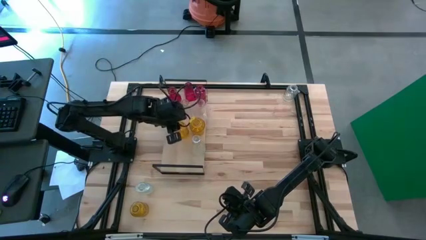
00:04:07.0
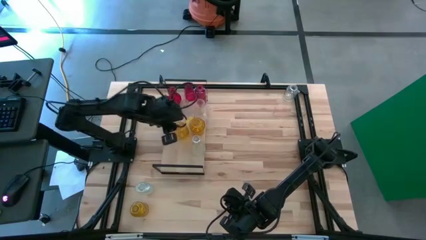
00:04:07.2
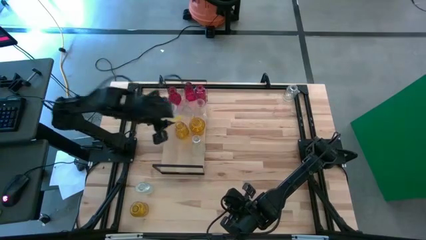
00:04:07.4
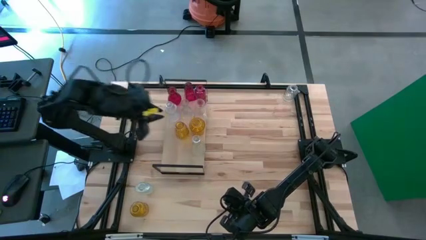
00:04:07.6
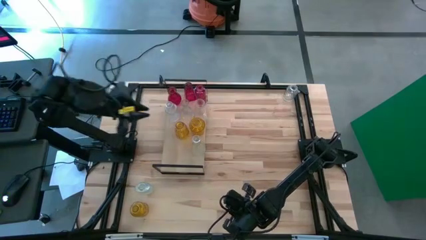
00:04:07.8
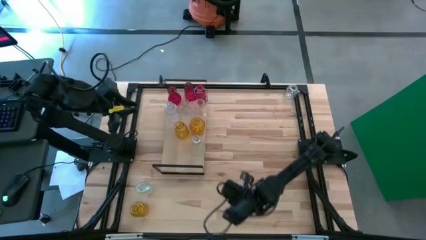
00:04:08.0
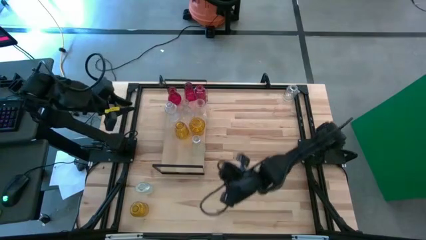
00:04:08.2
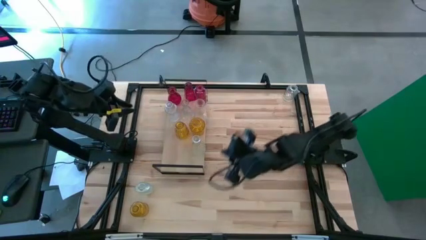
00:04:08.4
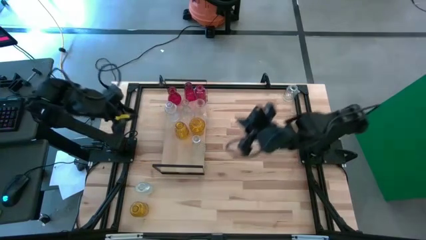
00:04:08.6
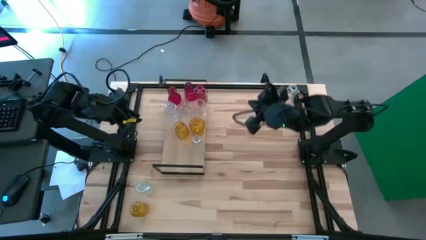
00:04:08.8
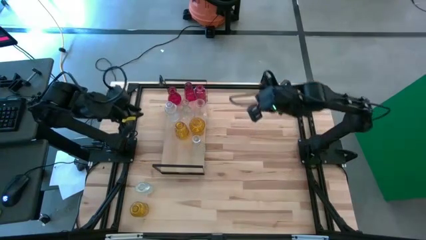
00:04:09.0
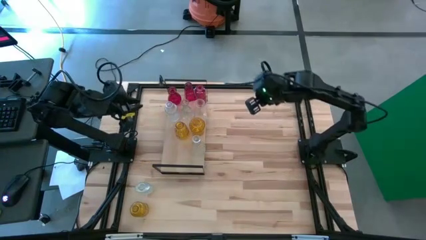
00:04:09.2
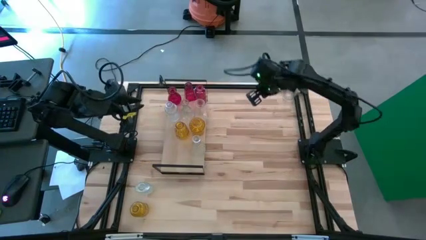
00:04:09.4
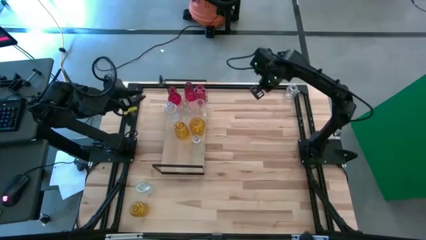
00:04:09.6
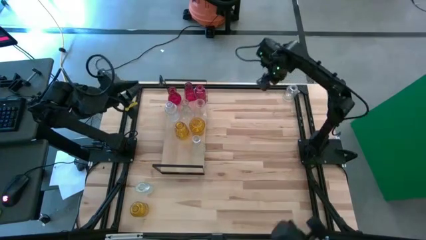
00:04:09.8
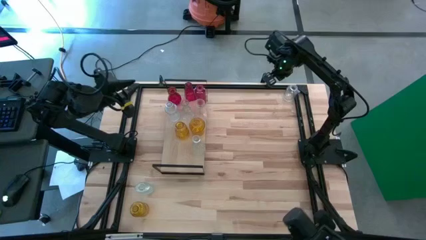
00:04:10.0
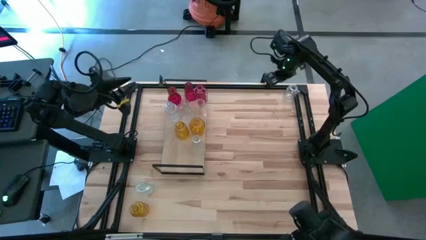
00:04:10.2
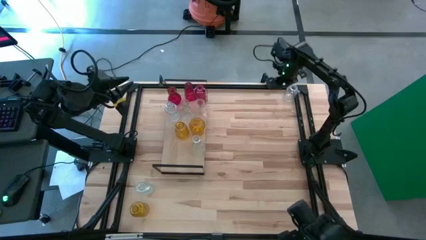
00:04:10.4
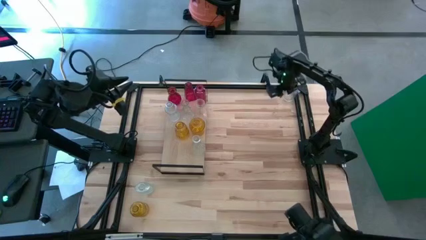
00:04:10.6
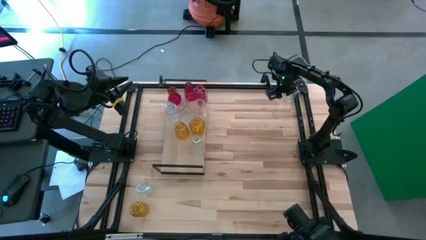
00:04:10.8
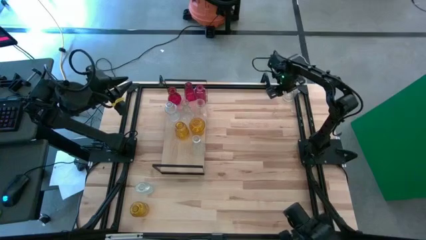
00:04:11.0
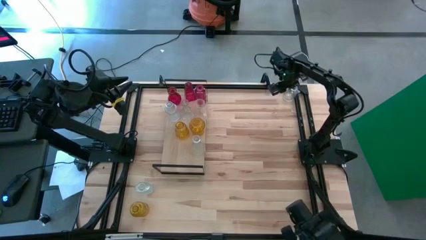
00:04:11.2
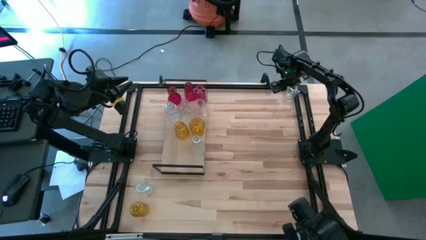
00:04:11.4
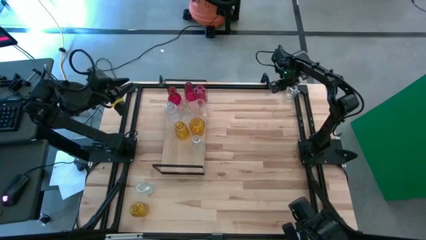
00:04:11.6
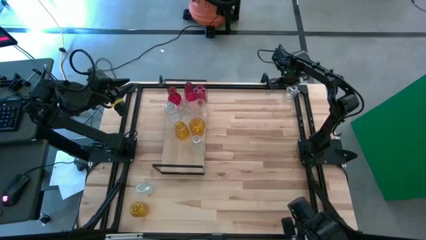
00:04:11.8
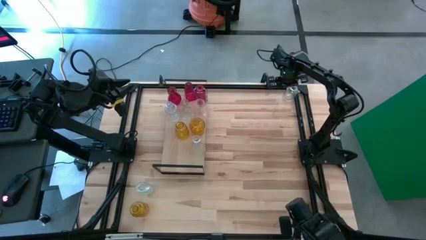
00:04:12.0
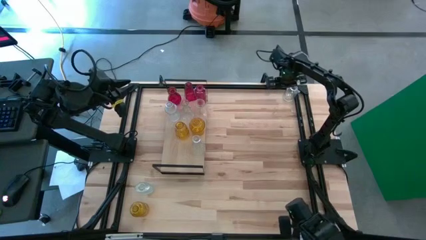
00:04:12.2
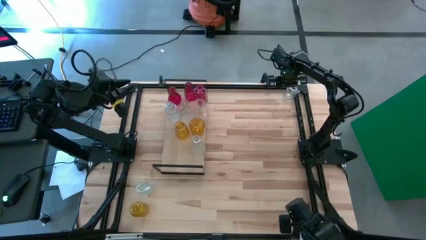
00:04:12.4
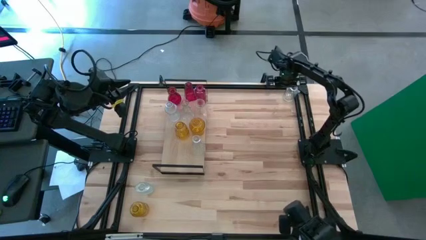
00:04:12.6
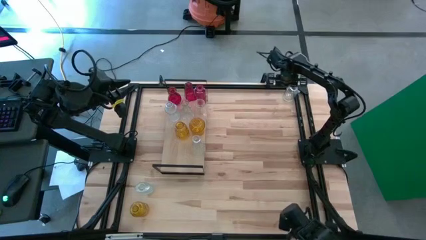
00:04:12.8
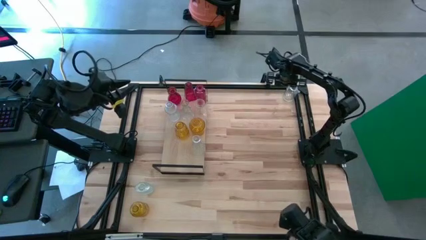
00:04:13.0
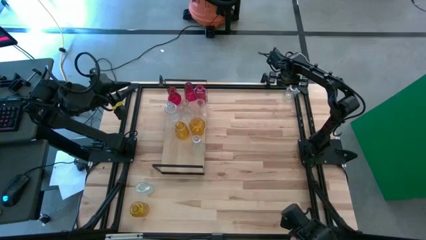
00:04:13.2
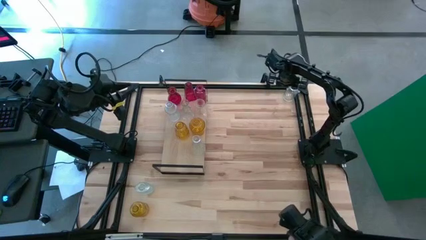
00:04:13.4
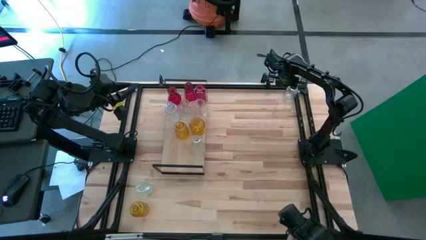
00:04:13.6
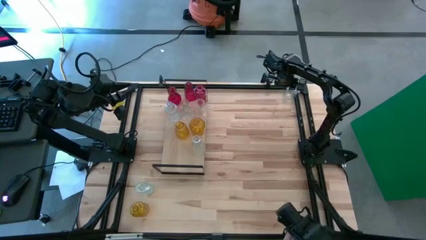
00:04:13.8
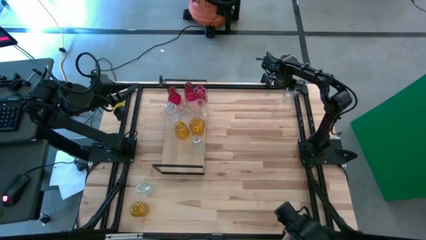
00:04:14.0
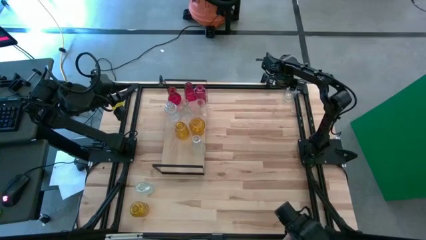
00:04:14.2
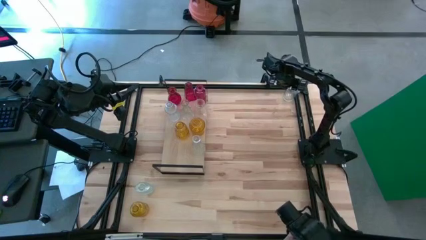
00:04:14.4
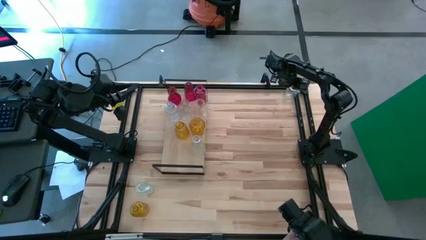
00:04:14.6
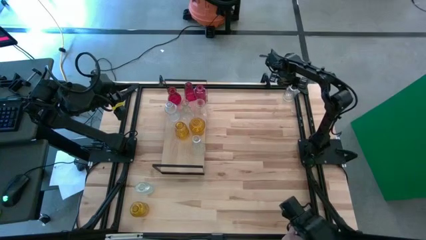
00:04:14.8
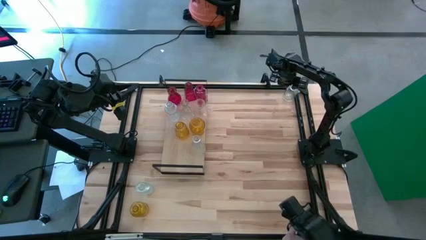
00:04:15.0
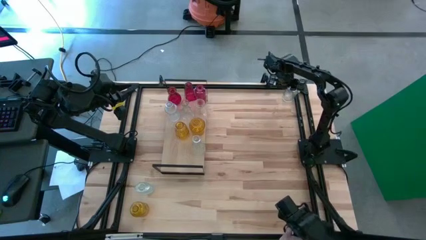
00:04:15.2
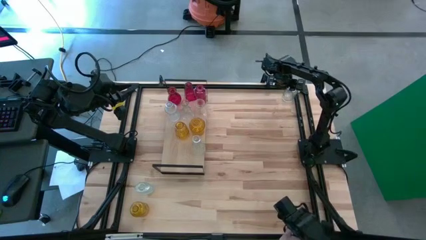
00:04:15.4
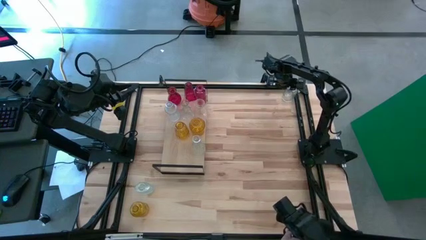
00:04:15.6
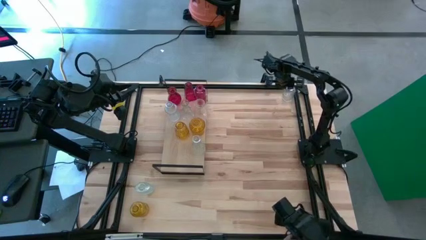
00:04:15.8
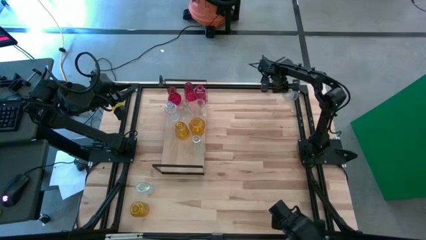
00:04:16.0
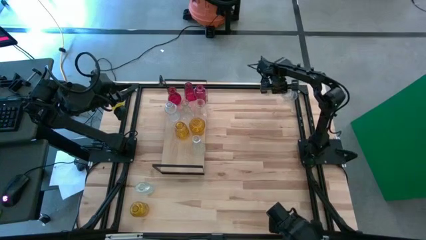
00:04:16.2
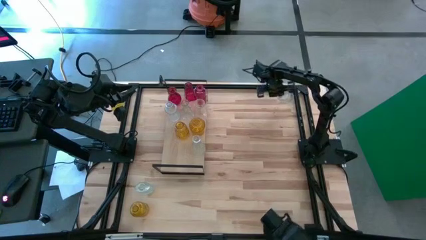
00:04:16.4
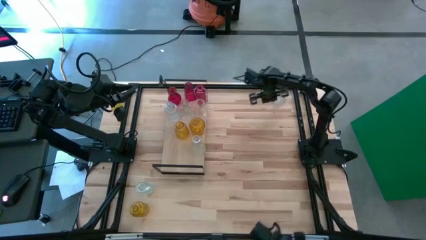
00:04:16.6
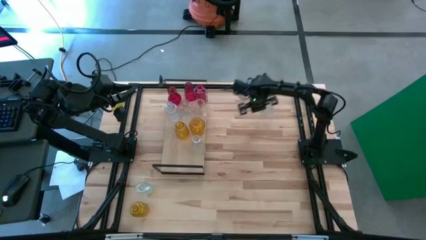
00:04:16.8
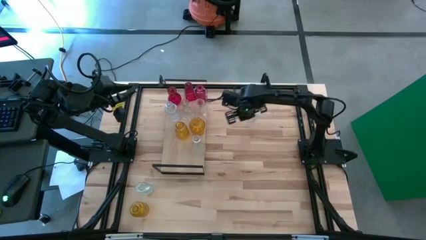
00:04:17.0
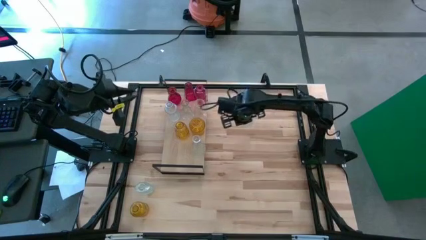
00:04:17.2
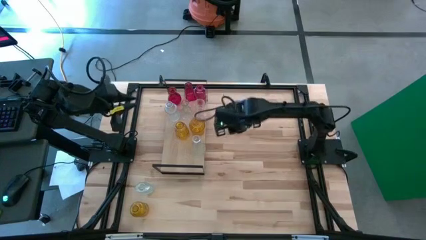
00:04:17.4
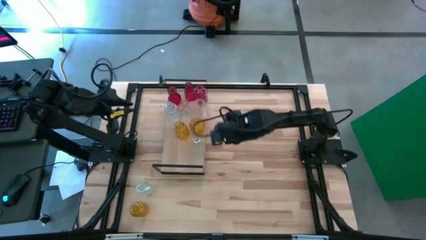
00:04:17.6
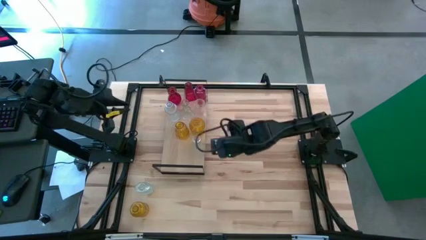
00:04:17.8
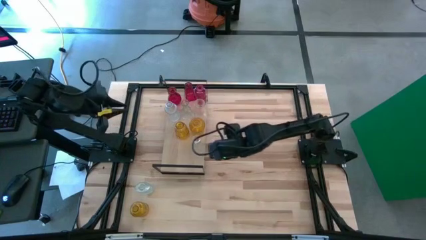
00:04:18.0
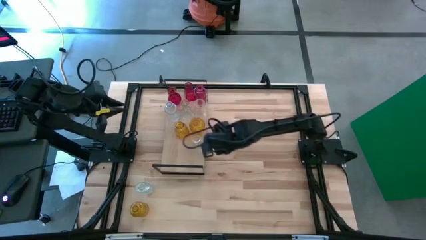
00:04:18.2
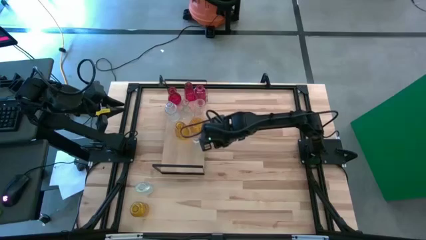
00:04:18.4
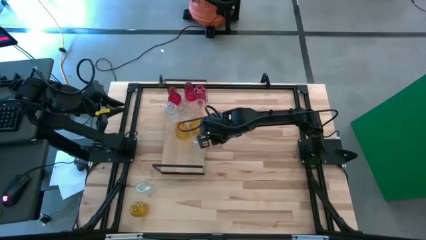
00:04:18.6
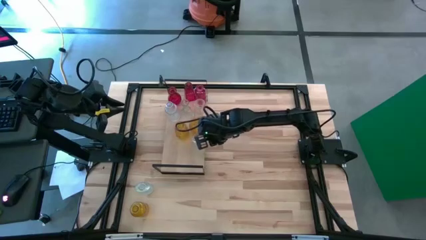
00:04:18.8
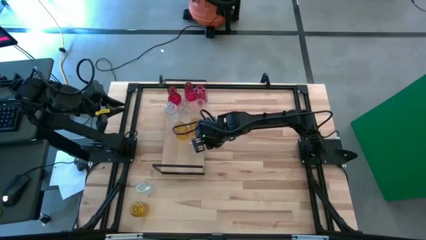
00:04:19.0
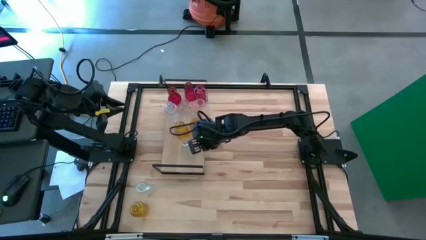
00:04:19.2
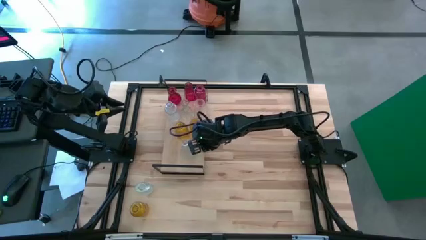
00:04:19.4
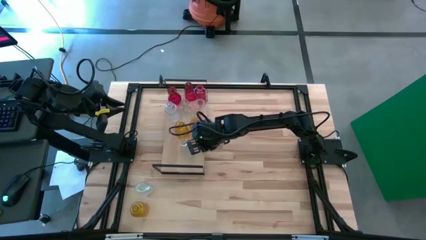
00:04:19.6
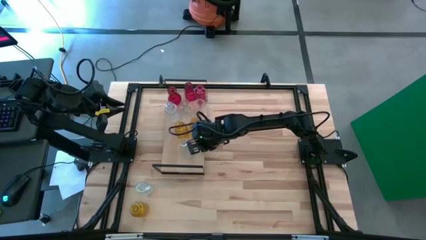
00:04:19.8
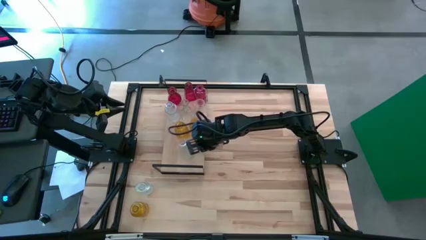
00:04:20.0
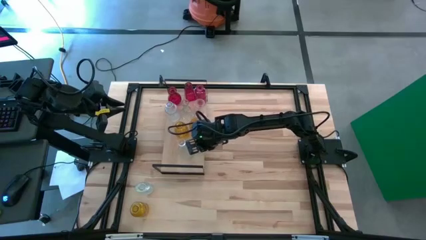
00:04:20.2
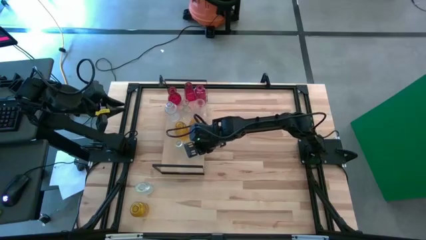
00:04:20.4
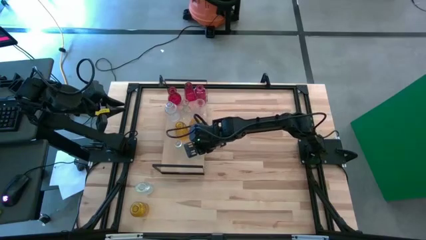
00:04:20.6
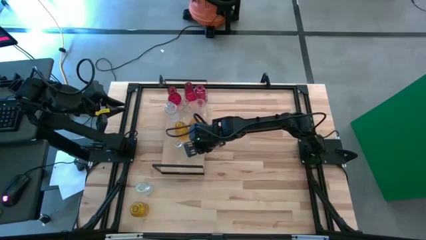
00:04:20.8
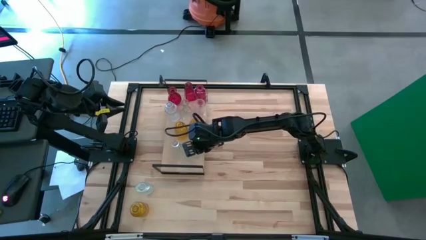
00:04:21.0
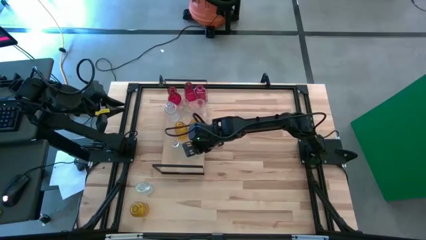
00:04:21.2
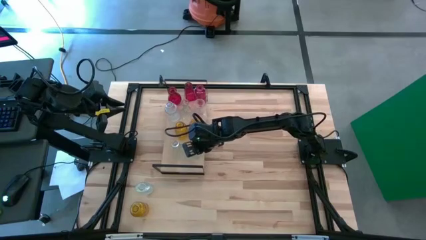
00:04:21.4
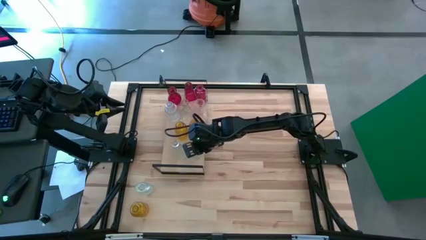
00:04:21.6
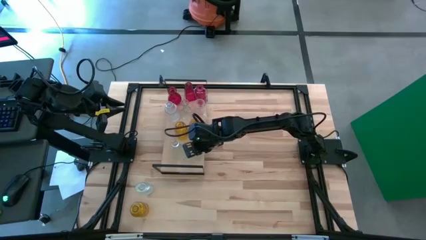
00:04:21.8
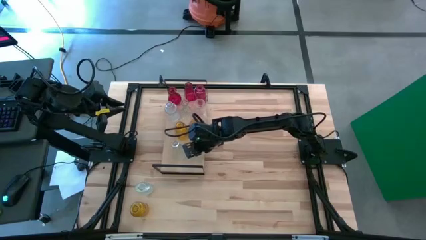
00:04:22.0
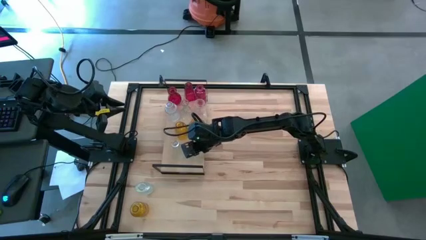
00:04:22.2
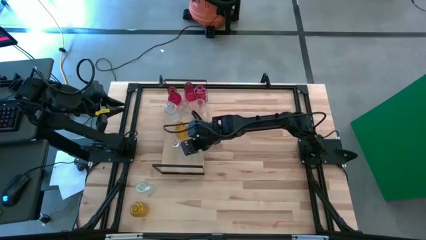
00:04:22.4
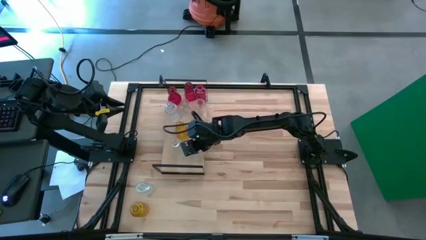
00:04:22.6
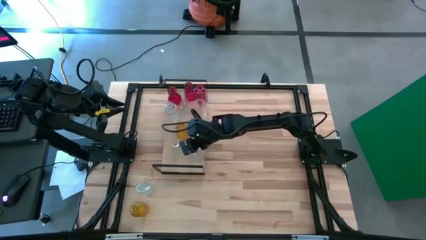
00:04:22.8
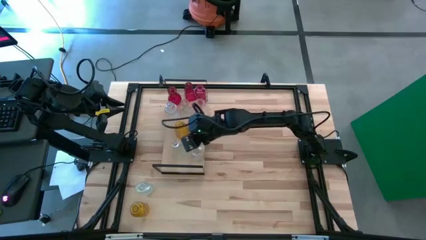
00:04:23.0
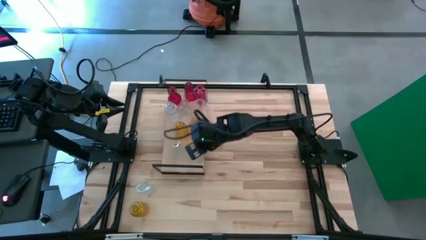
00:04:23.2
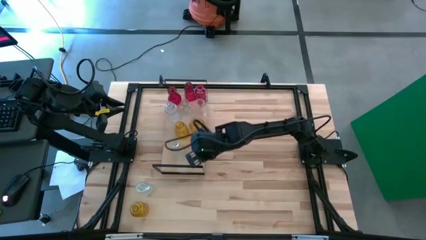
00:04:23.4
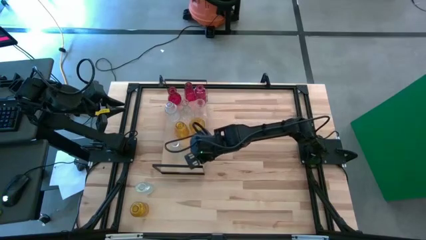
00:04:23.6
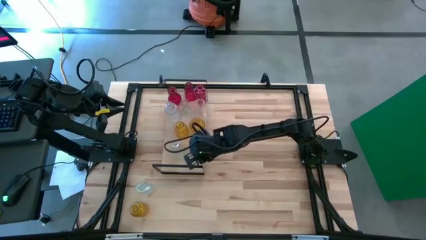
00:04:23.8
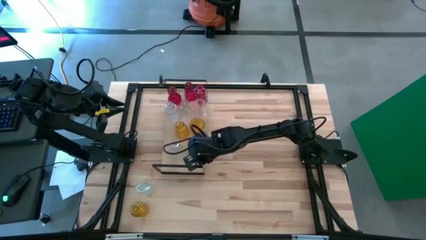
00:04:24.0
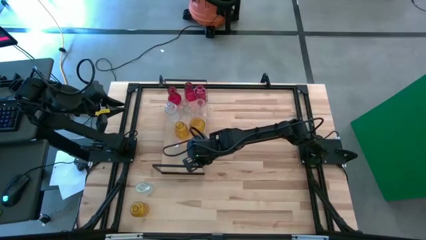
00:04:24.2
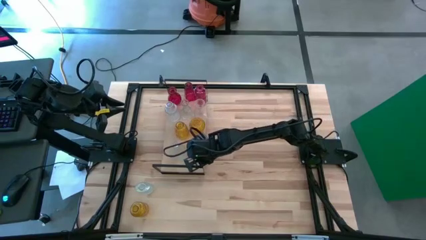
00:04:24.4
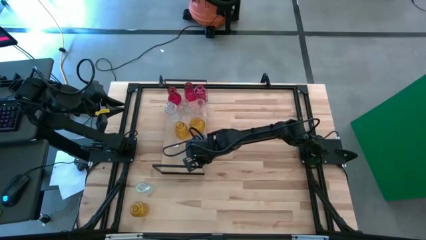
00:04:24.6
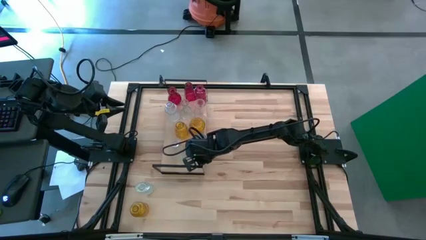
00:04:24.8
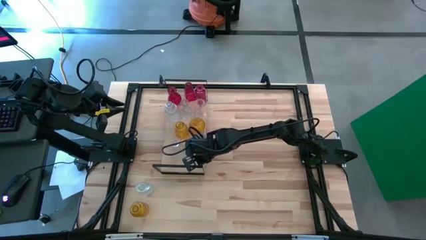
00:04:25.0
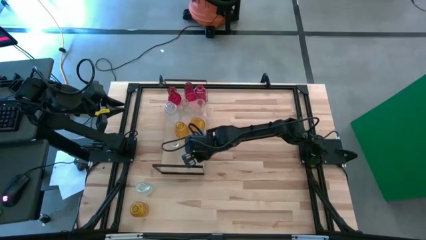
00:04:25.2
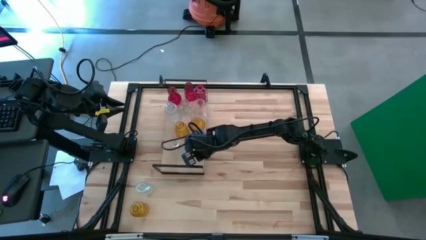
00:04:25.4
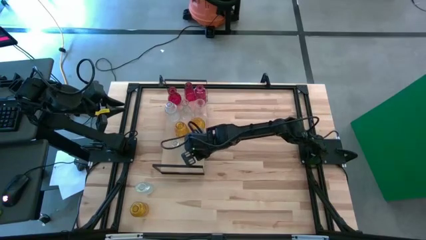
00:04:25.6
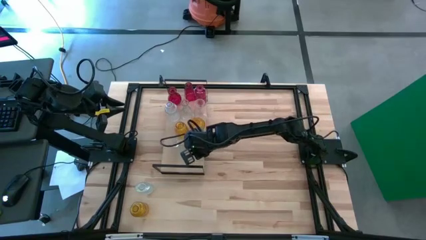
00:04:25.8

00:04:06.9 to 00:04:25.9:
Task: sort vases onto shelf
Put the transparent vase on the shelf aligned with the other transparent vase
